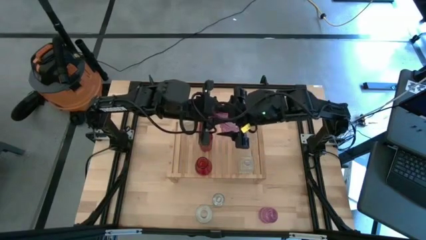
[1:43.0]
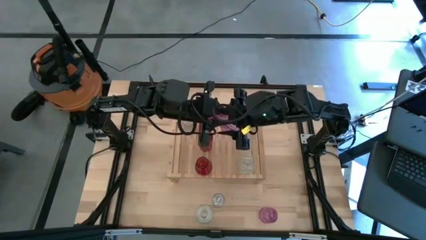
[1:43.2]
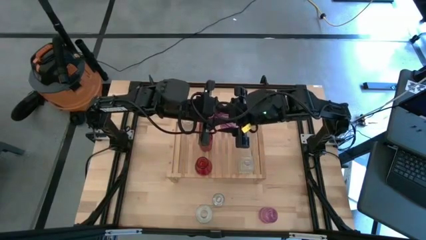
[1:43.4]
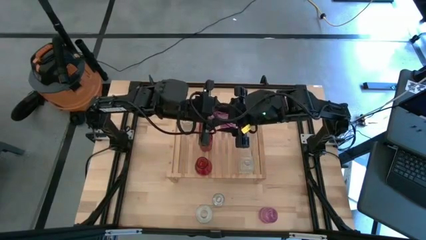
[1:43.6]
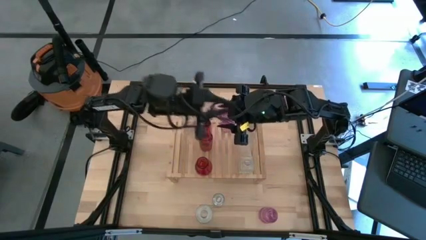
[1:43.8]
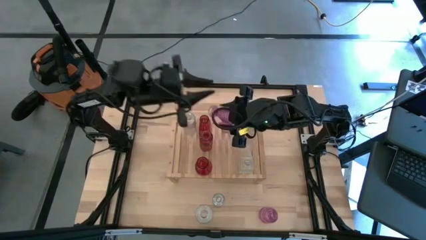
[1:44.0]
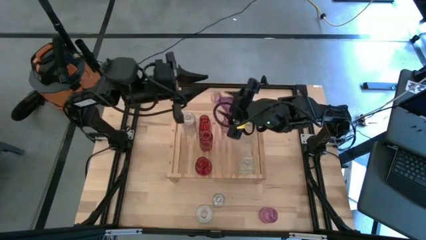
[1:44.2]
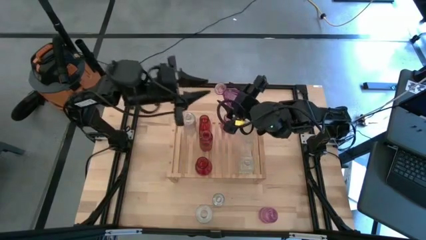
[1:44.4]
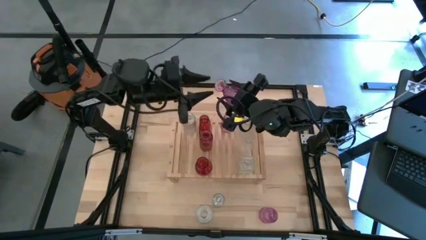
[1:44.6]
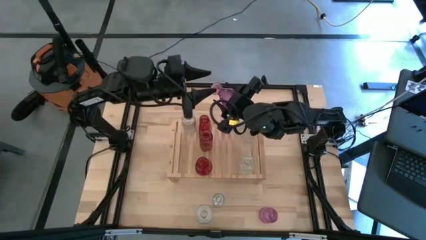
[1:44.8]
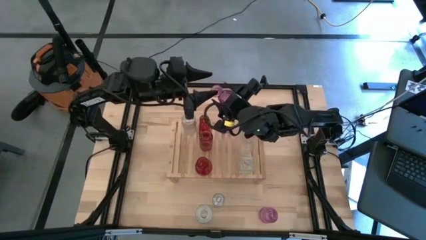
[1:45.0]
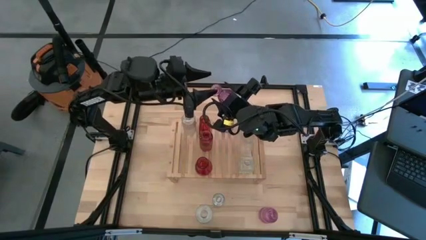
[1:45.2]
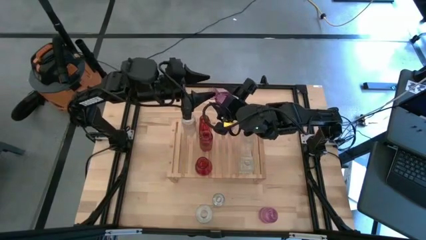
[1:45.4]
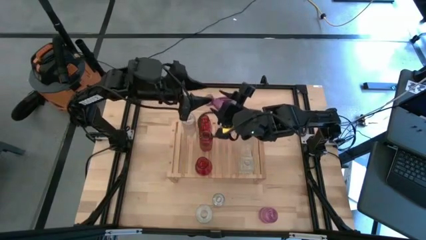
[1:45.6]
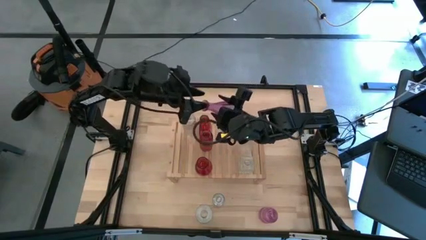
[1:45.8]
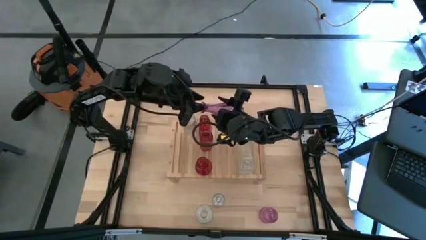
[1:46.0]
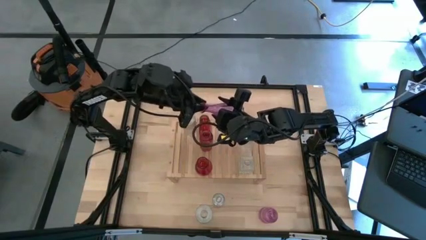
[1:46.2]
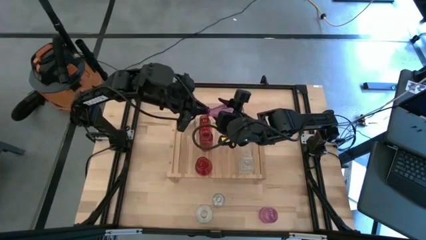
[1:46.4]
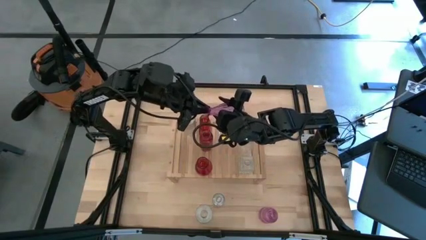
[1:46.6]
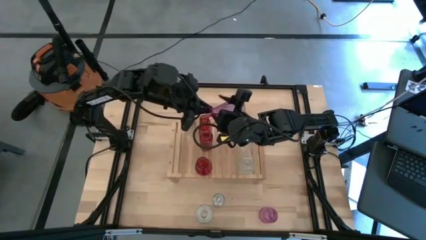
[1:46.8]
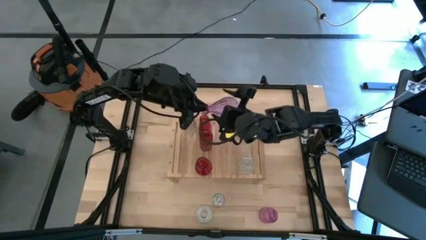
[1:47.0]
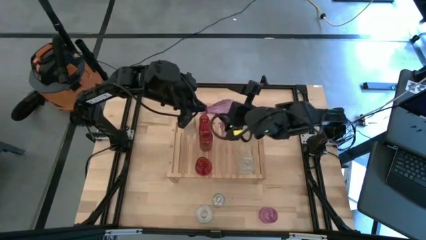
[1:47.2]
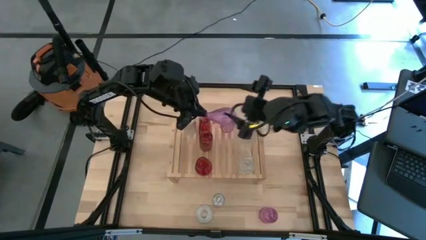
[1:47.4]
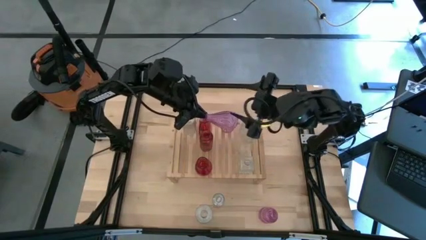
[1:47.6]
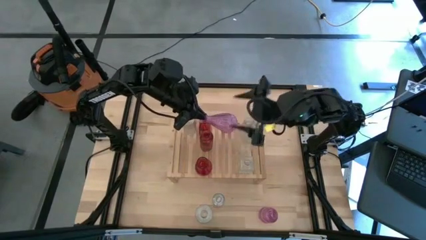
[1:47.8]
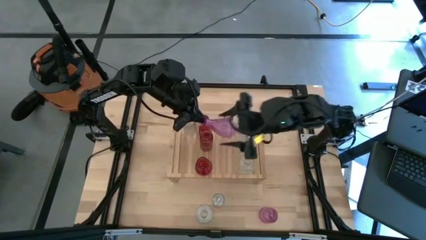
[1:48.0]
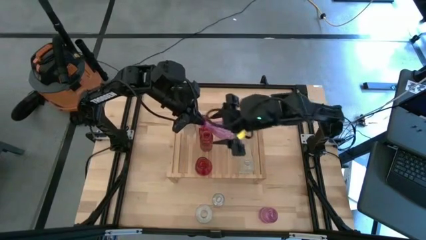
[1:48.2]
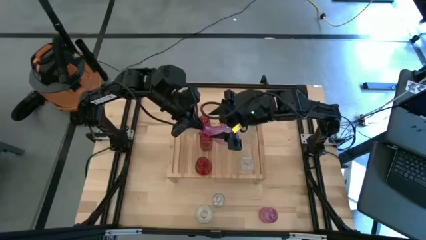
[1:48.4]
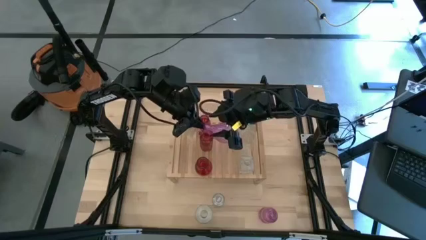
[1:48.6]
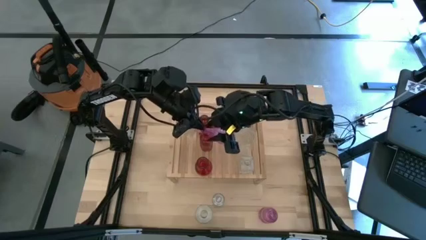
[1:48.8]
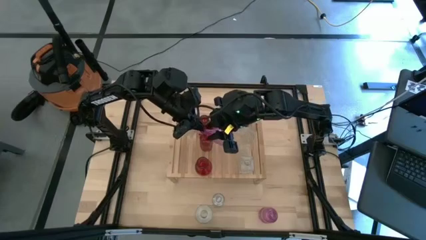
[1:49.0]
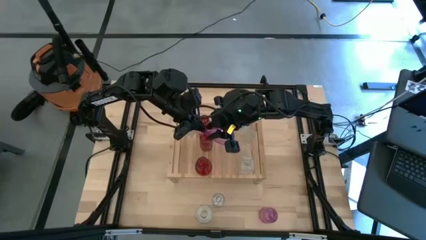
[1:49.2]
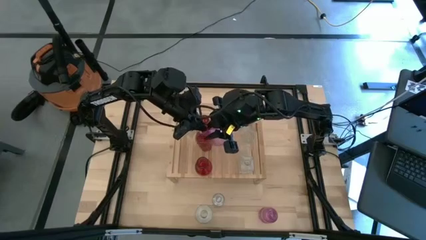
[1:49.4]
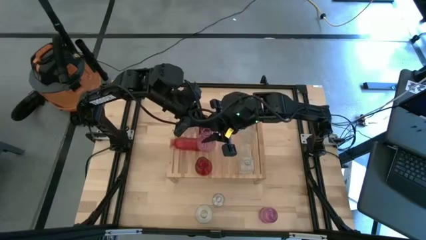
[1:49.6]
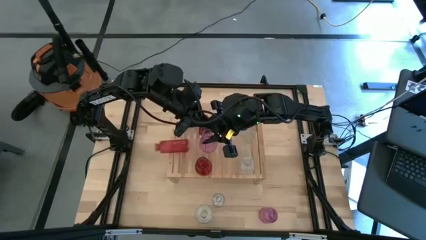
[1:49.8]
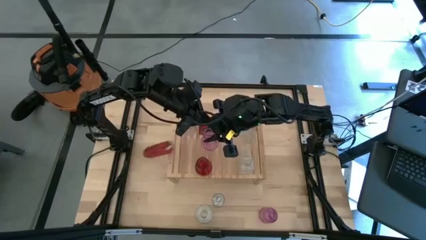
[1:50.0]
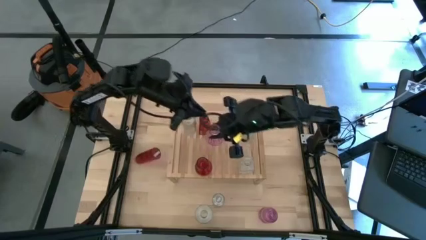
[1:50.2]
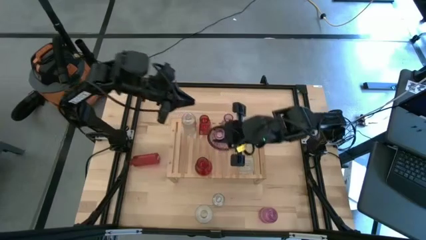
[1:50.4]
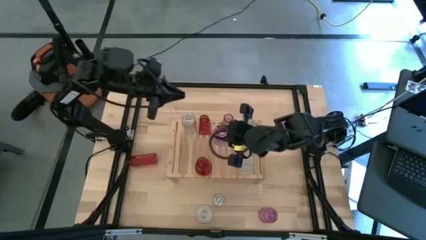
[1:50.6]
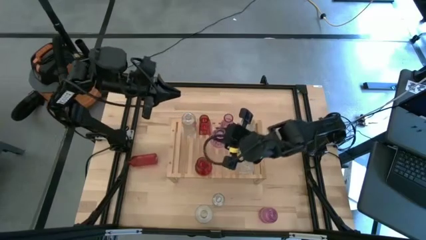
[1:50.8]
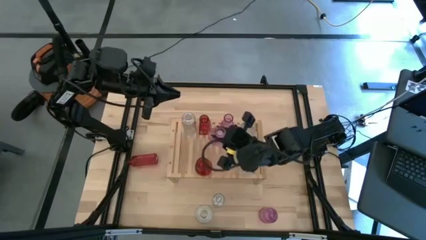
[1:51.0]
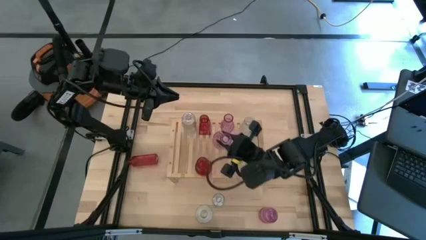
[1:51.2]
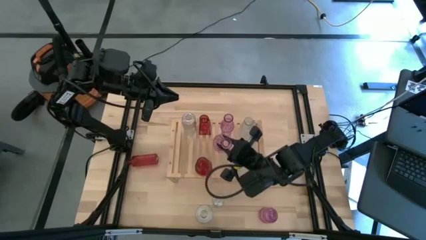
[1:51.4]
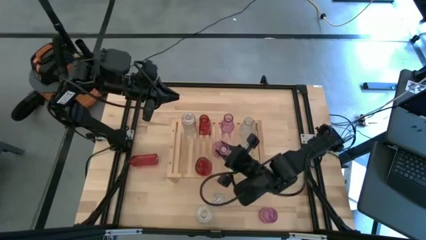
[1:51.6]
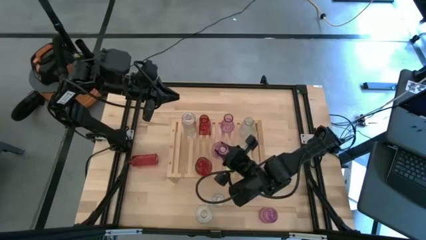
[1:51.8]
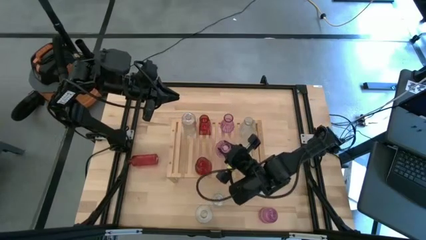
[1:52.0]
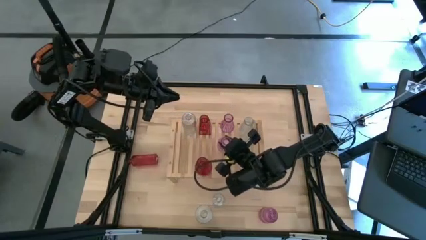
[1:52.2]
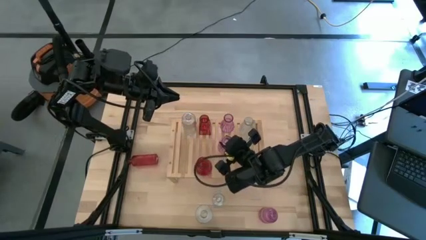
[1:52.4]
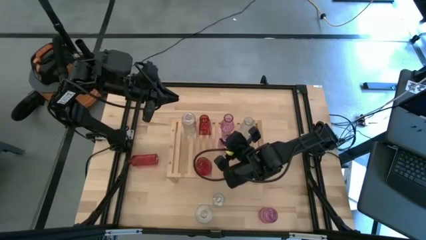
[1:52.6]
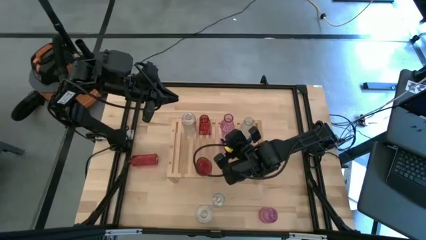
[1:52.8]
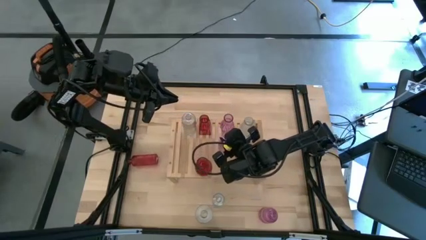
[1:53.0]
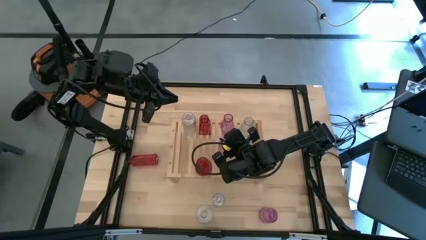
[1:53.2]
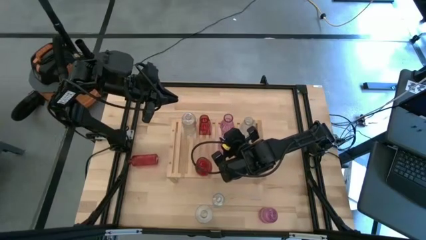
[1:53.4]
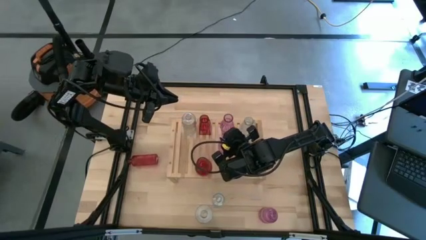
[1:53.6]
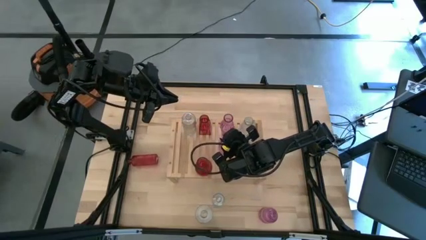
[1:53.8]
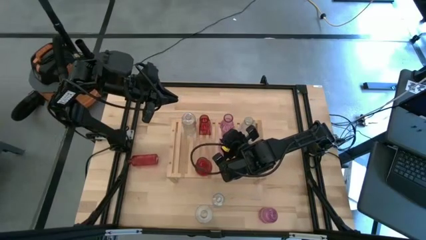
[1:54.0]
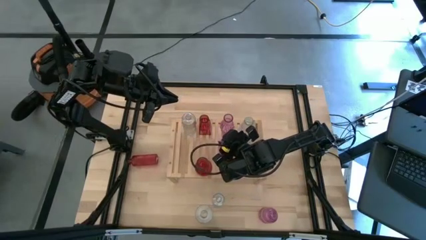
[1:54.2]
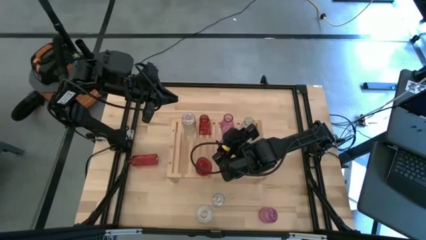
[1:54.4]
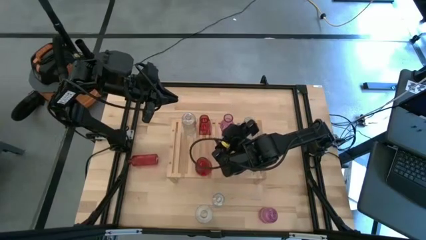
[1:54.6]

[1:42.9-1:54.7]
Task: sort vases onto shelf
Put the violet vase on the shelf aligned with the other violet vase

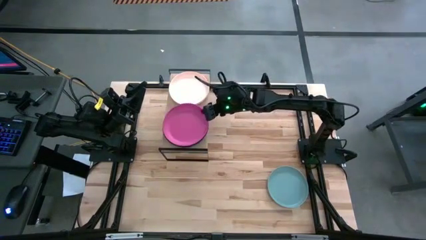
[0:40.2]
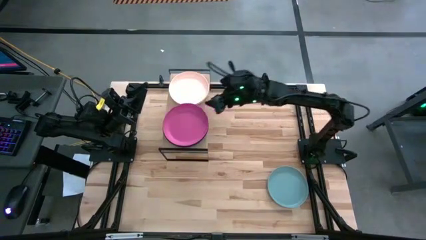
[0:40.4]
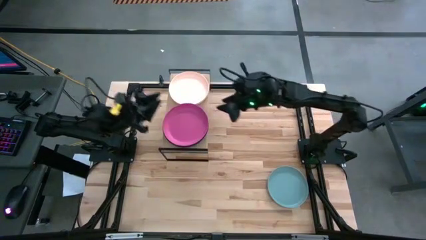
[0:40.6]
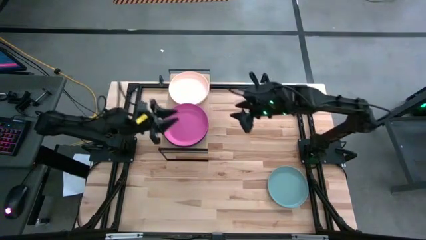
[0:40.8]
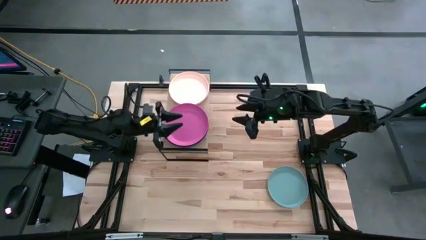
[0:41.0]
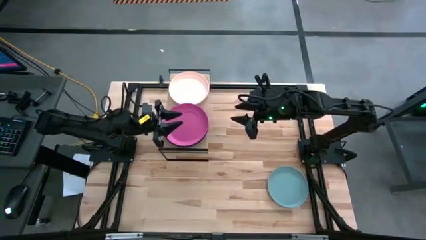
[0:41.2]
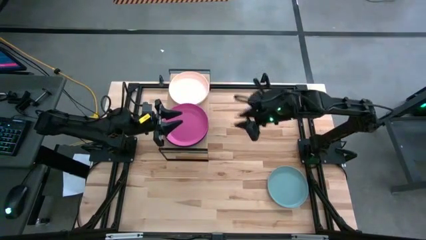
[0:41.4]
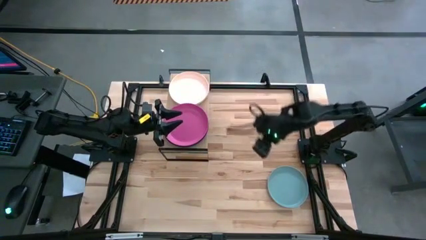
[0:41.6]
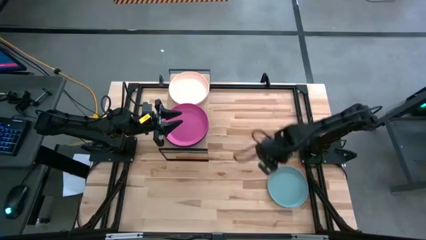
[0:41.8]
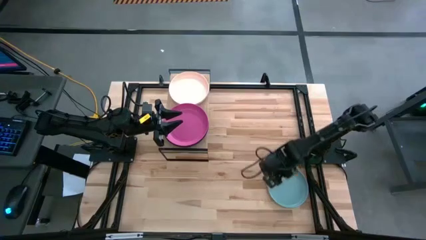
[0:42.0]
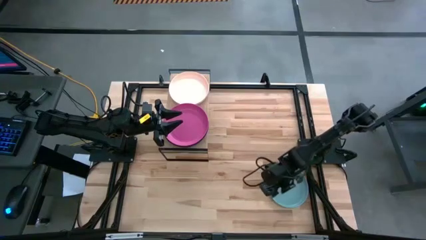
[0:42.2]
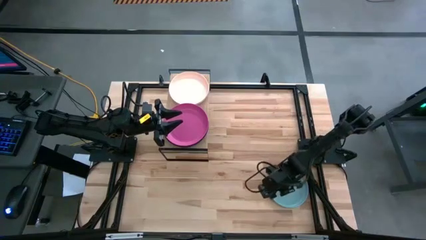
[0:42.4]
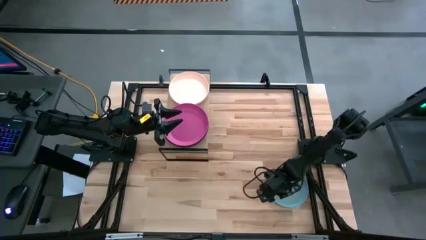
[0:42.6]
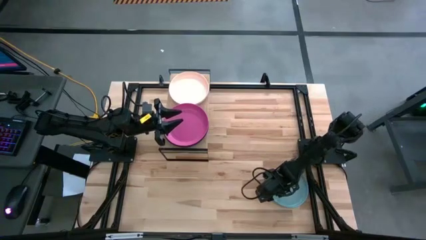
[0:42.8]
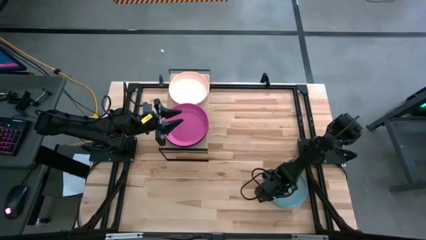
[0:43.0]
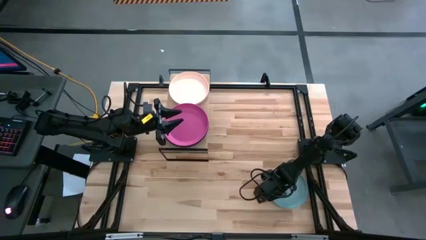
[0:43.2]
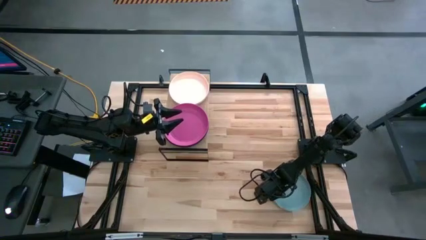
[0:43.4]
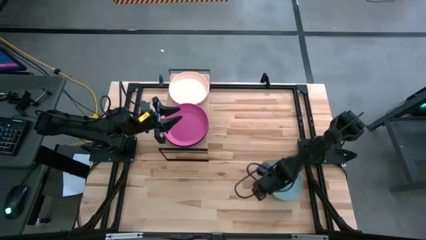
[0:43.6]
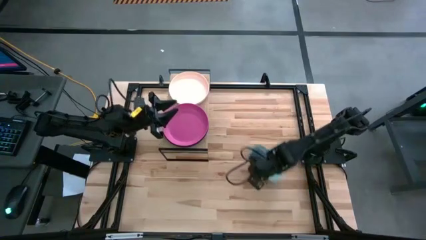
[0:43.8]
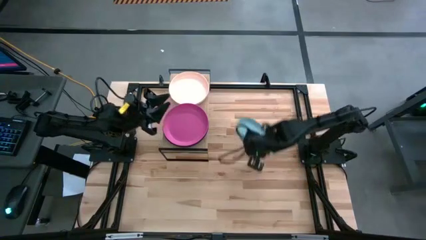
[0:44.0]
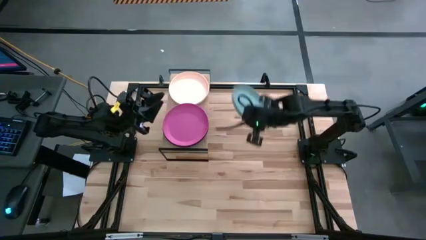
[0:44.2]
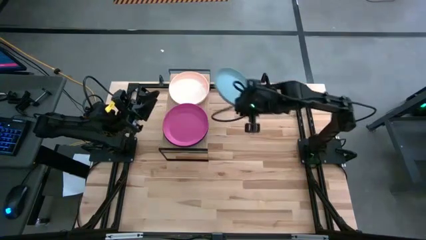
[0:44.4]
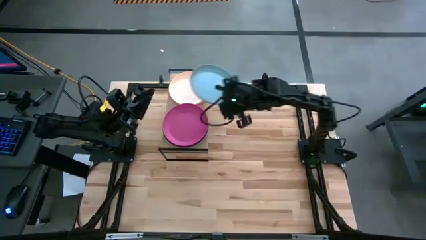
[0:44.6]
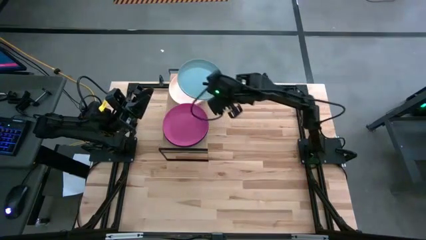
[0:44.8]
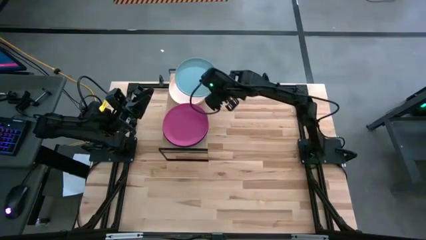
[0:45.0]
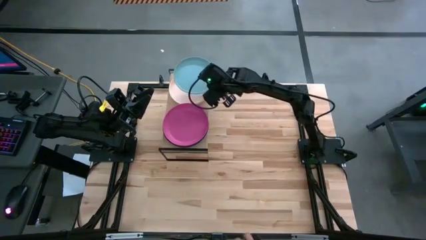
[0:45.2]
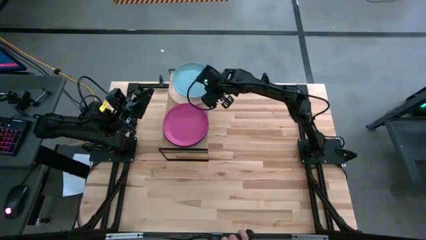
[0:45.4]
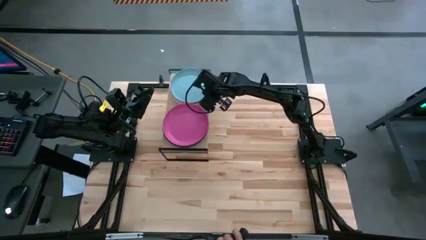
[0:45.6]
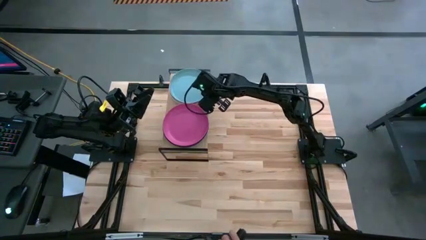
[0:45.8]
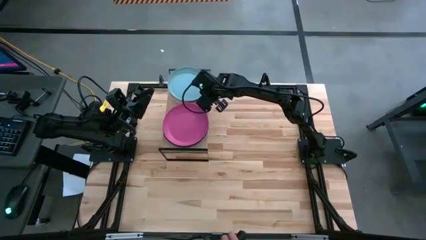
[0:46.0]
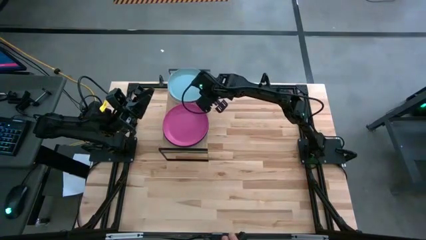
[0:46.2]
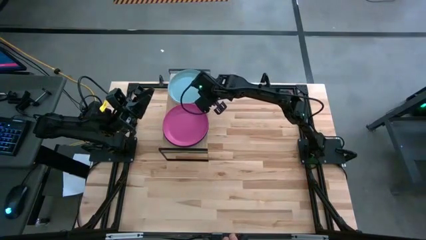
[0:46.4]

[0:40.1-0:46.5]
Task: Place and stack plates onto a shelf
Stack the light blue plate on top of the light orange plate on the shelf
